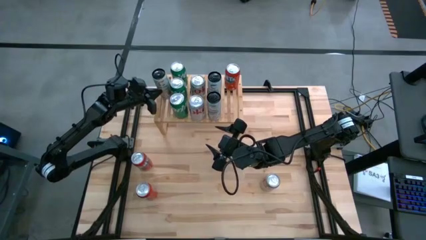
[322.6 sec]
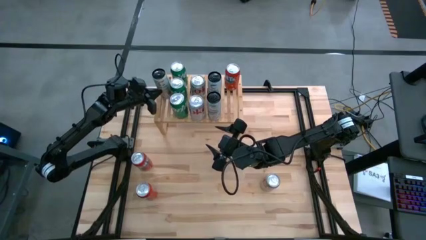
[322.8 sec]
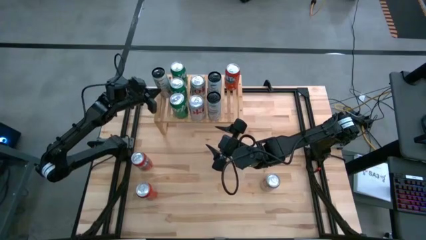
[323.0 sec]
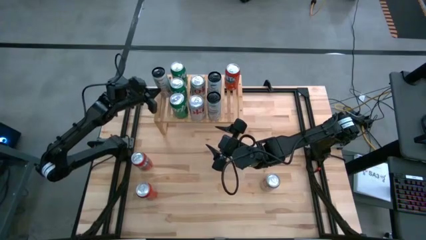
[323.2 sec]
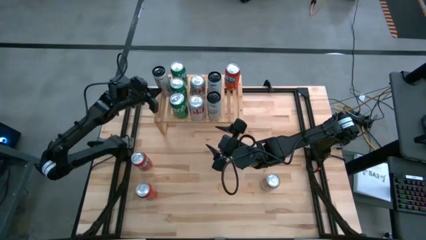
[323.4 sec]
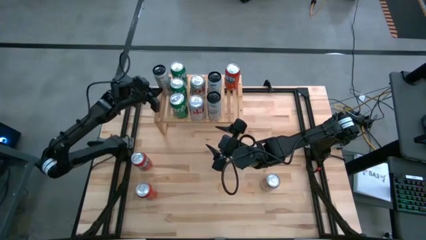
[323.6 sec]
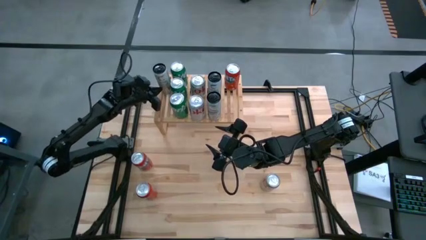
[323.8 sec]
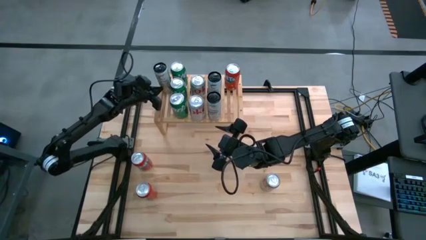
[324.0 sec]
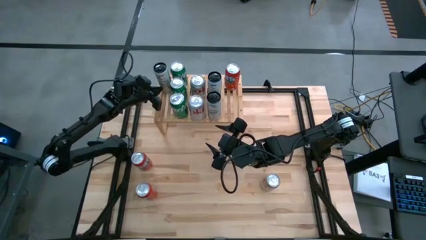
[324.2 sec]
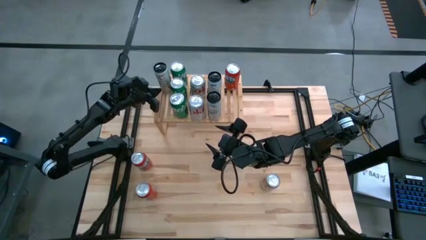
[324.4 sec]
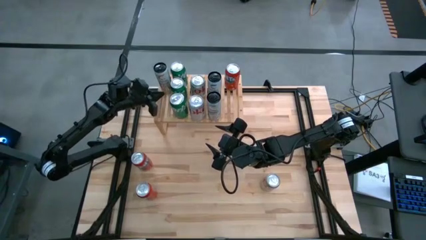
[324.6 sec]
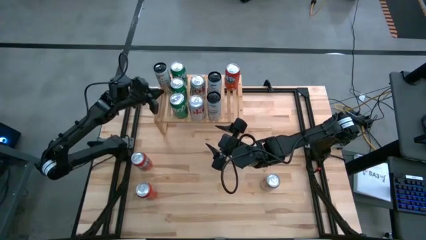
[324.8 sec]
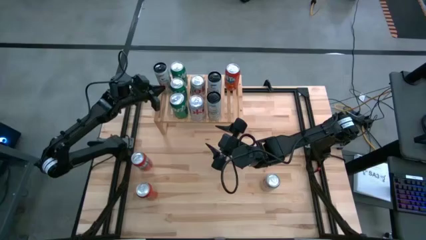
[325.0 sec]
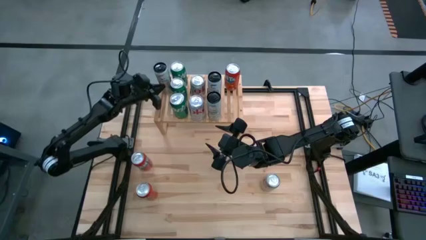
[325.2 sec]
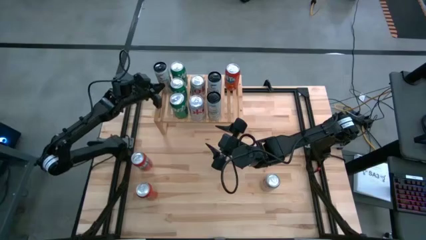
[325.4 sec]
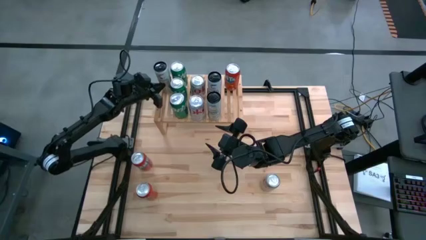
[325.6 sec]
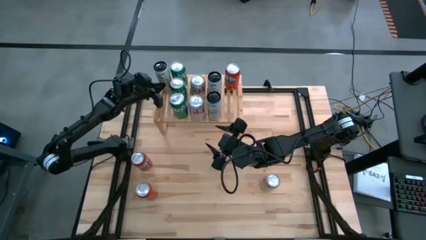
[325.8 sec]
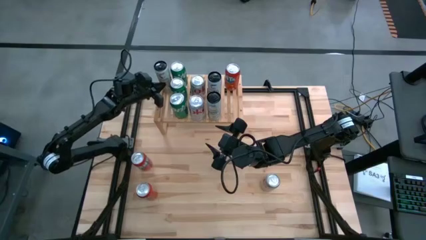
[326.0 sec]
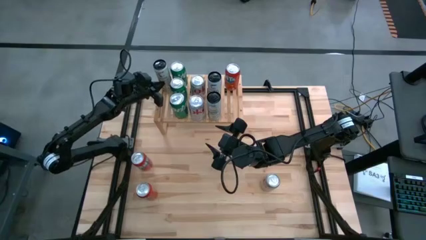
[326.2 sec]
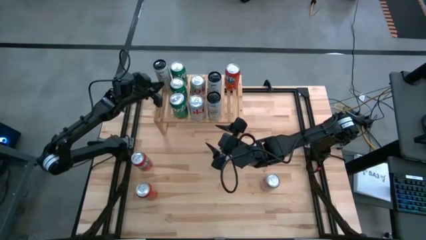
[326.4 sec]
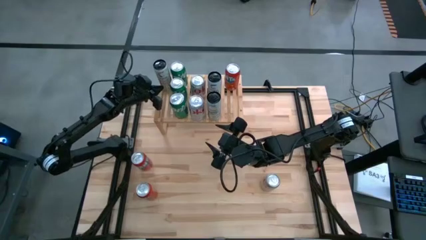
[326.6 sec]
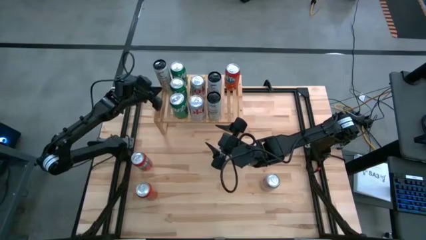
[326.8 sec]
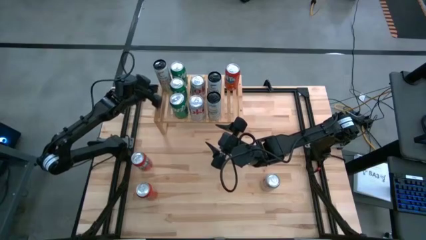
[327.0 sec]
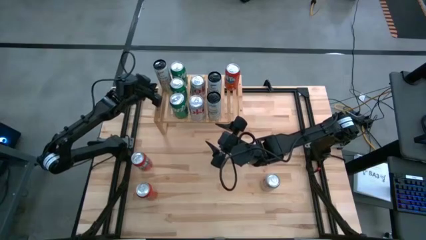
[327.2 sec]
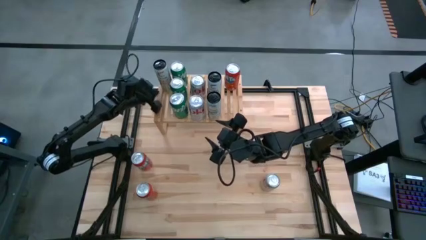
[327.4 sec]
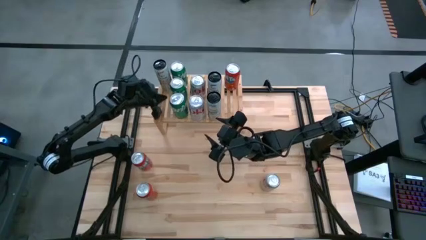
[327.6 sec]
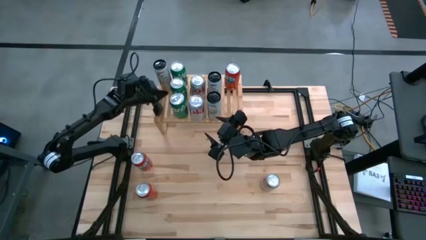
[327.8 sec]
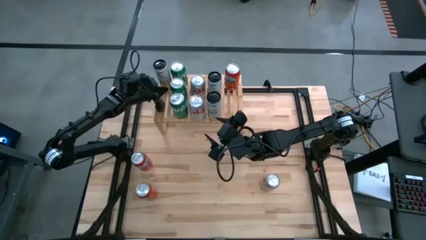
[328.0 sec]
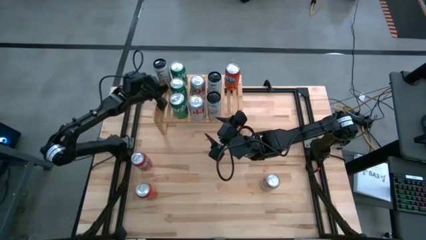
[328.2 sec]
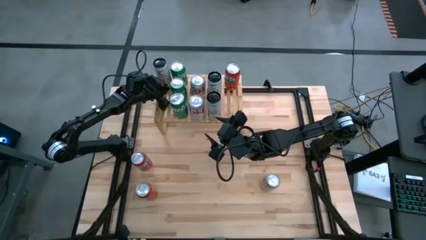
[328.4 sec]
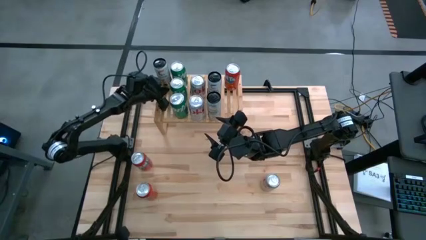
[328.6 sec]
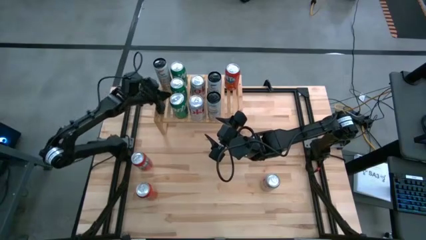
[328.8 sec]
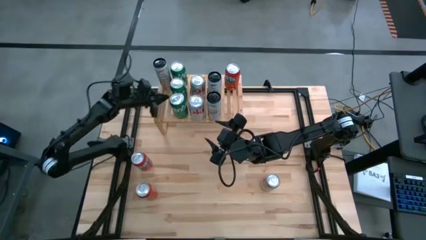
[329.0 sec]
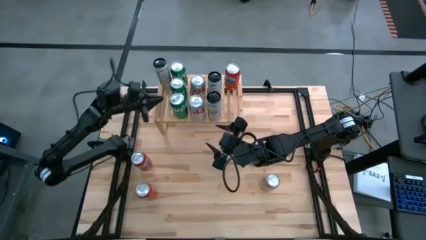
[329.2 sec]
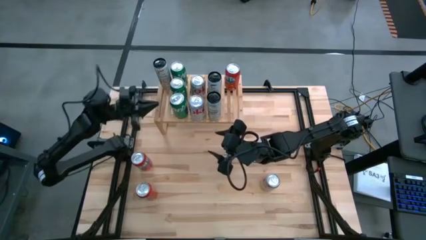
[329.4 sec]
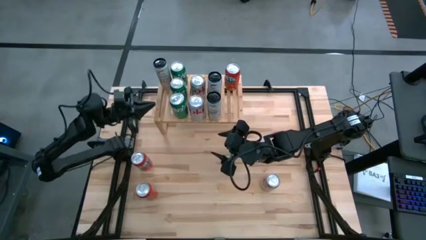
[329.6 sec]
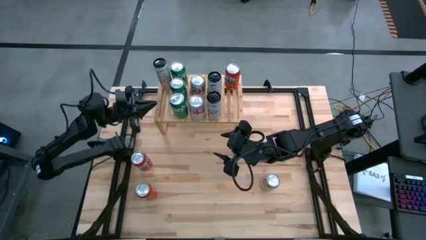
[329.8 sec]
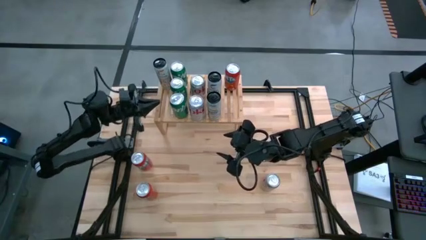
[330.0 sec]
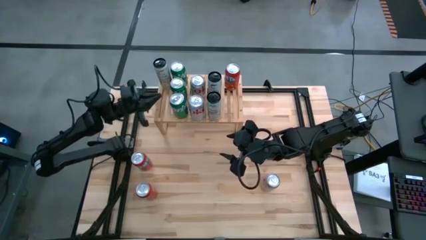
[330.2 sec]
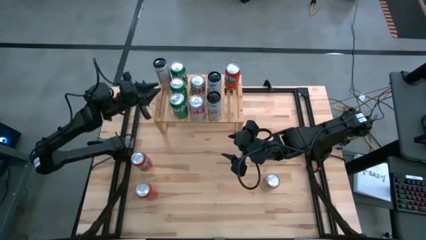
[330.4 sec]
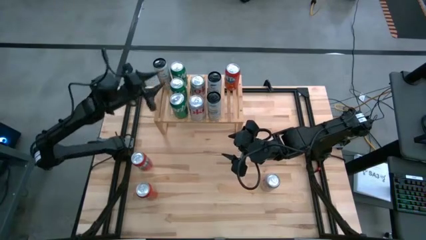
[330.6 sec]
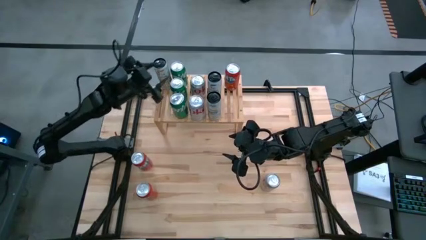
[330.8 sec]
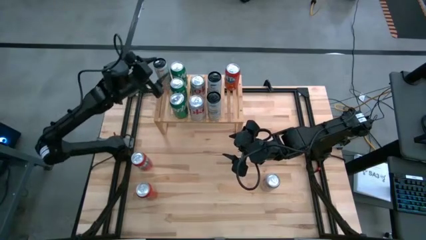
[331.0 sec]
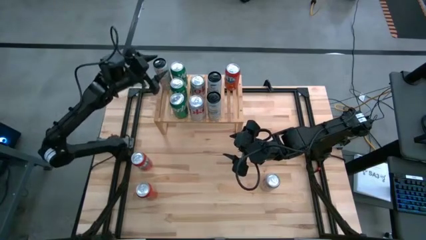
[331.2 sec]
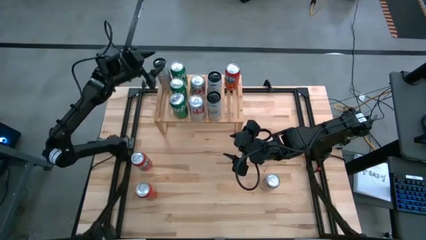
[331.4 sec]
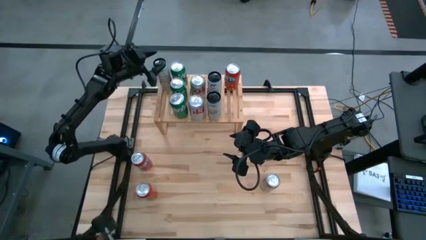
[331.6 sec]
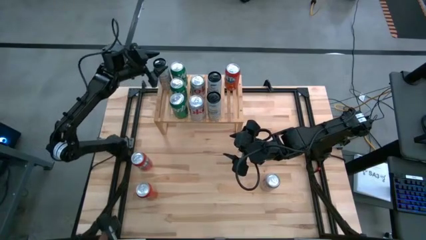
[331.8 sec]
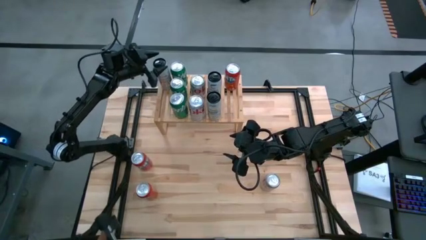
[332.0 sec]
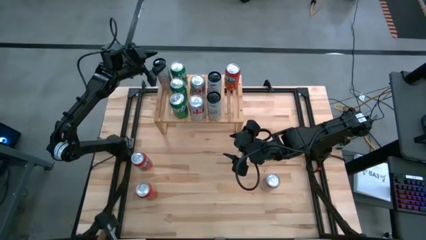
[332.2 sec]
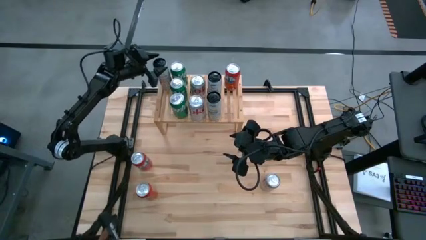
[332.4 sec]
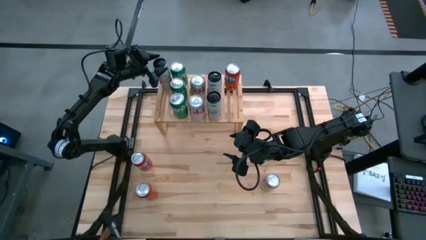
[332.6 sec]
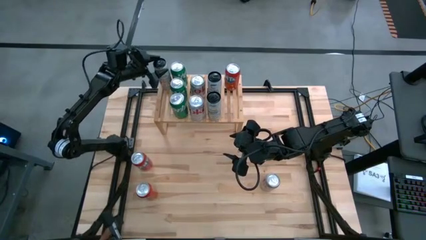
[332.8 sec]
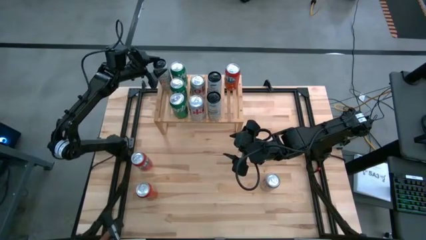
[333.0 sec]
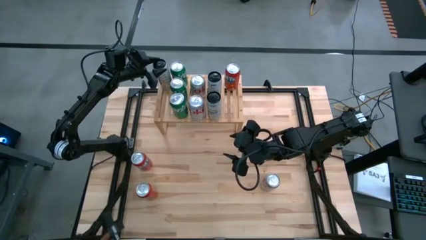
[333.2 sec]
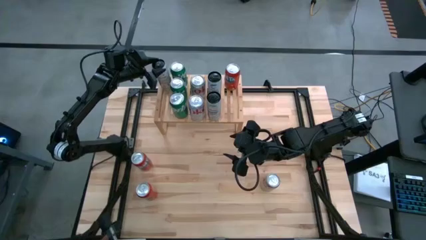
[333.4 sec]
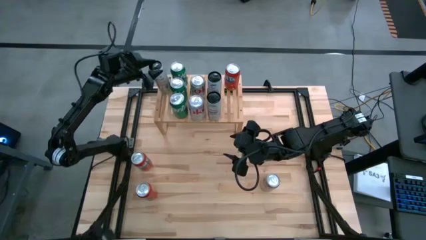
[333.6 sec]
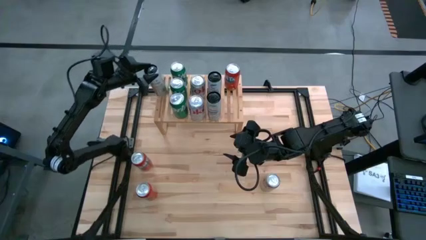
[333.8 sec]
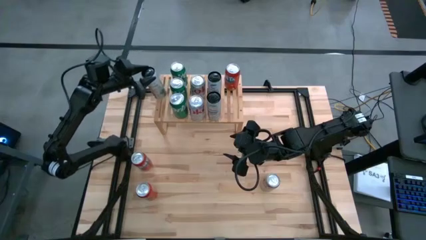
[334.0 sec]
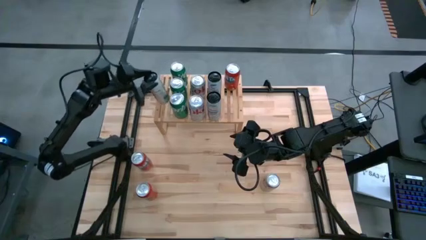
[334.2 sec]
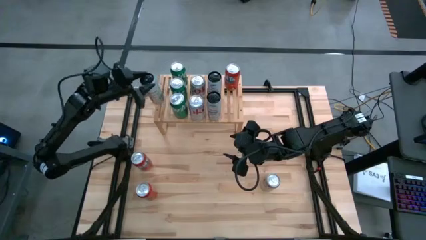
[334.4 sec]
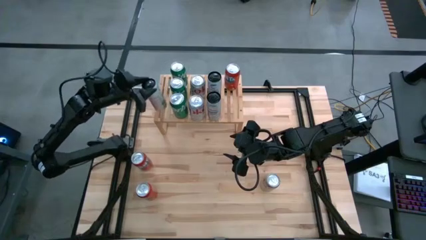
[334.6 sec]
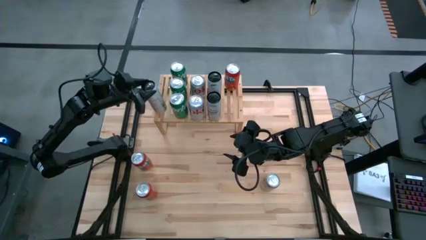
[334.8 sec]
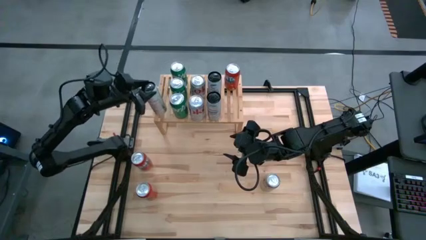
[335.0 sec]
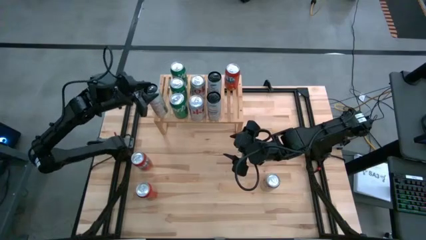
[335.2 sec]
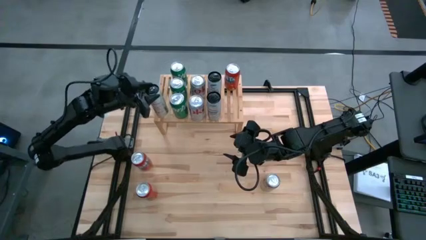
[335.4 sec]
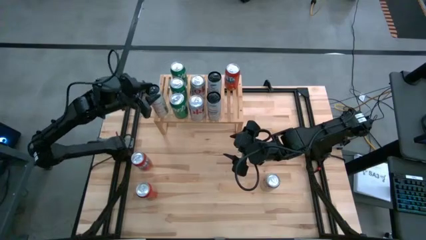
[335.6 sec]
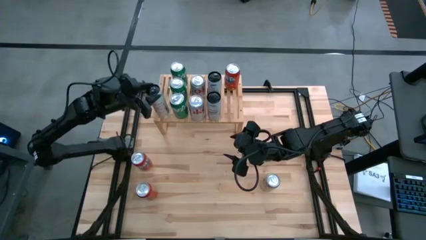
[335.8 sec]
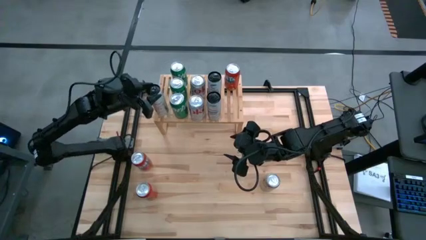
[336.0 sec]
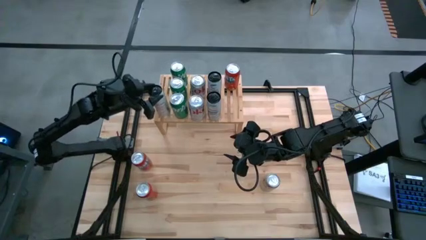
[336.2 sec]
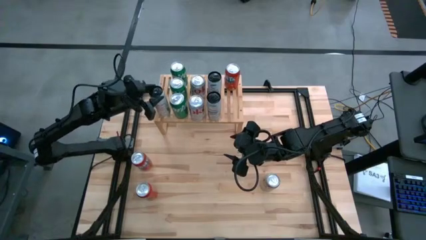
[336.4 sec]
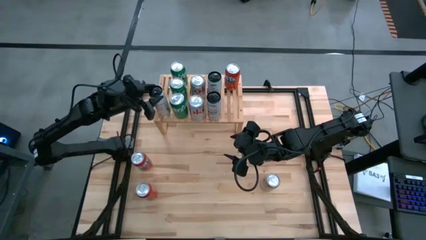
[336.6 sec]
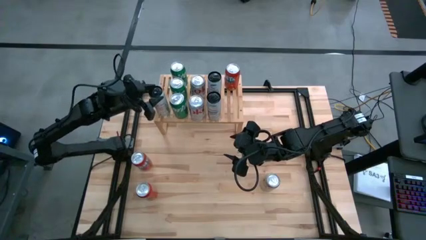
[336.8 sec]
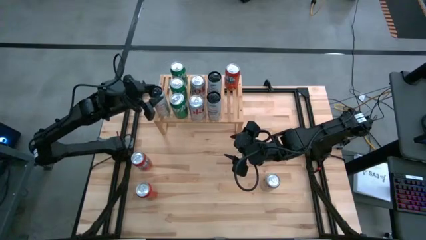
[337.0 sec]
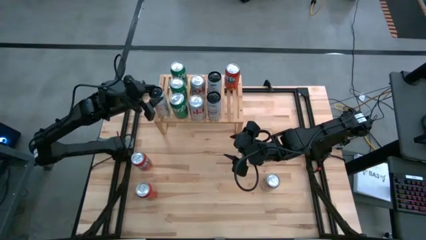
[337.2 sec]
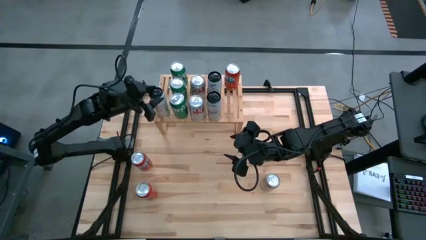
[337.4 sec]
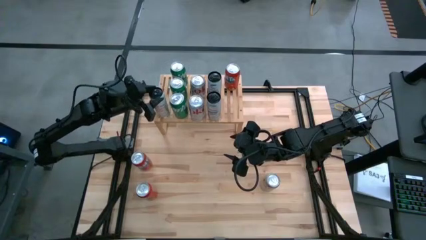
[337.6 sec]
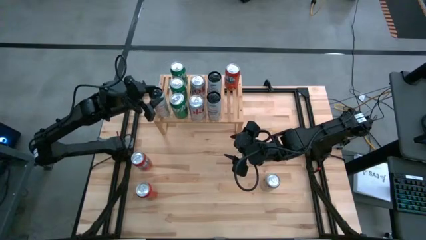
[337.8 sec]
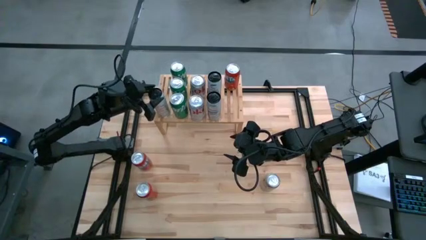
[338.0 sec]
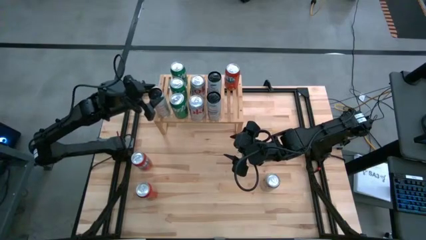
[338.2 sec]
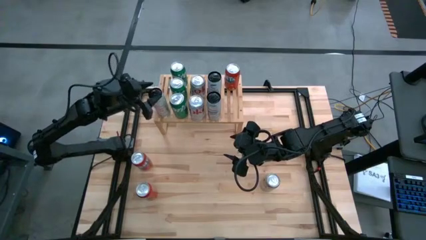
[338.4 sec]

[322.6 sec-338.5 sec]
Task: Place canned beverage on shelf
Put the yellow soda can on the shelf
